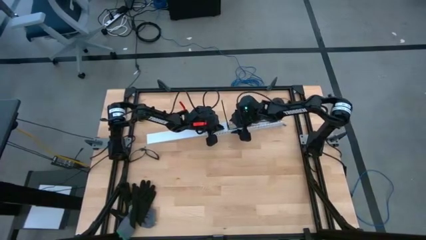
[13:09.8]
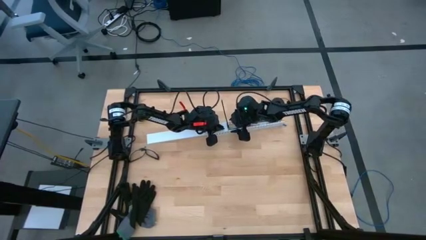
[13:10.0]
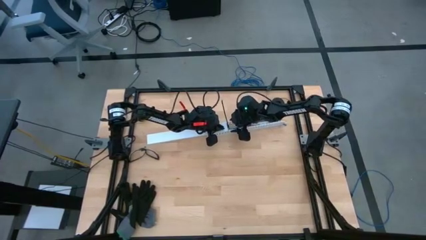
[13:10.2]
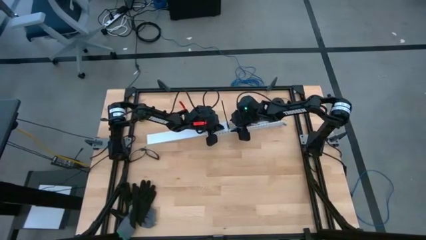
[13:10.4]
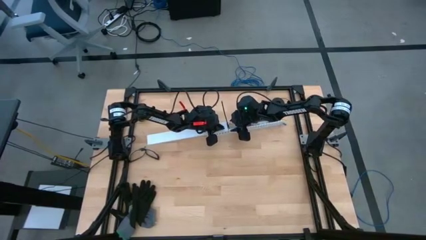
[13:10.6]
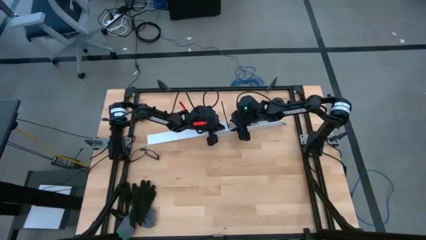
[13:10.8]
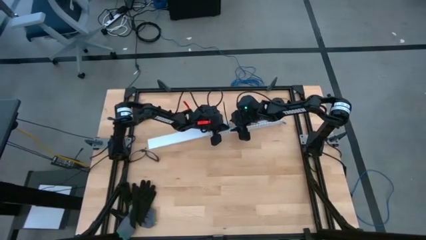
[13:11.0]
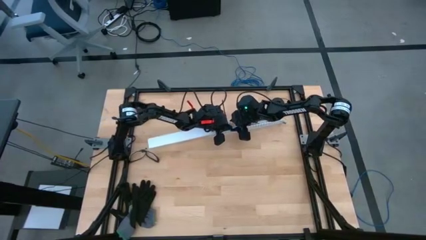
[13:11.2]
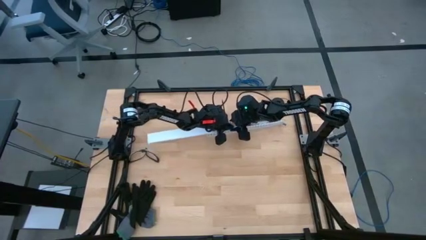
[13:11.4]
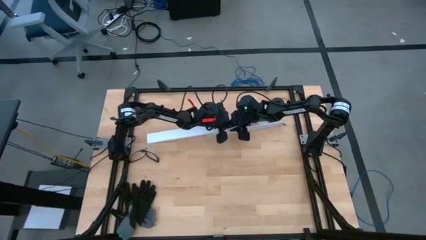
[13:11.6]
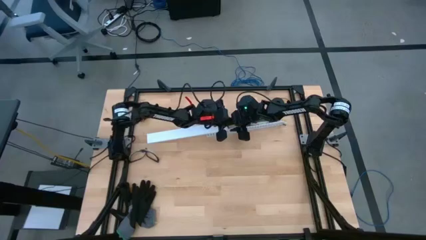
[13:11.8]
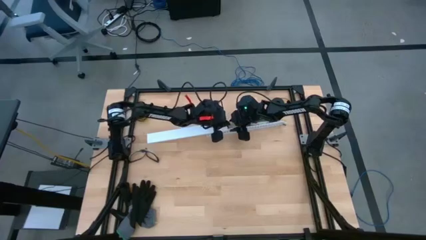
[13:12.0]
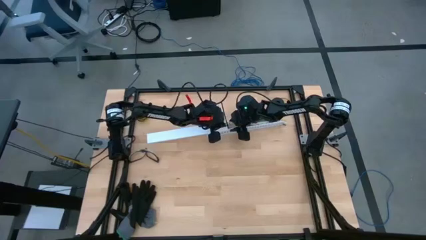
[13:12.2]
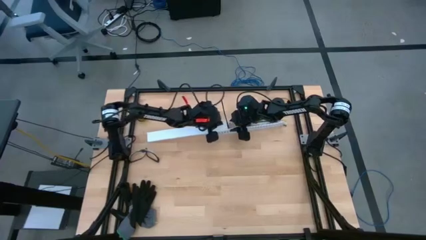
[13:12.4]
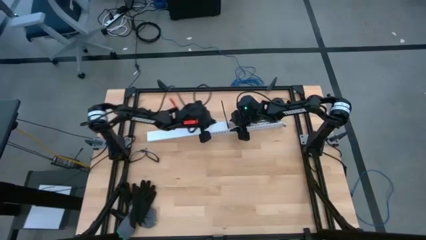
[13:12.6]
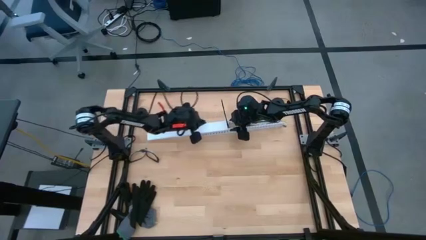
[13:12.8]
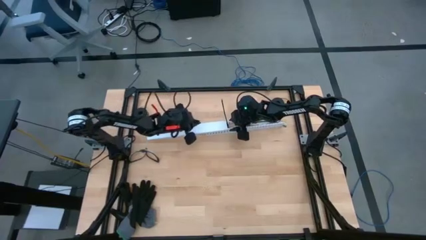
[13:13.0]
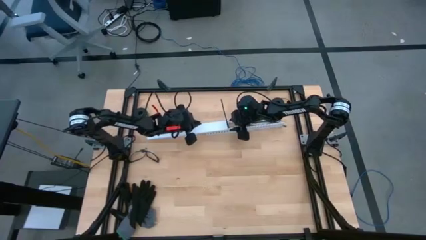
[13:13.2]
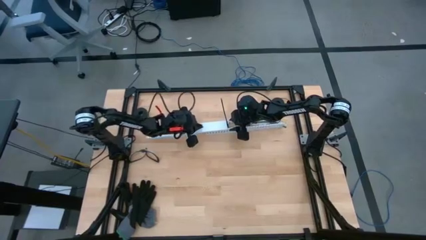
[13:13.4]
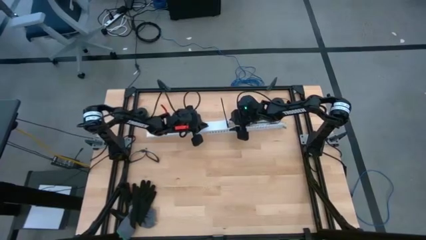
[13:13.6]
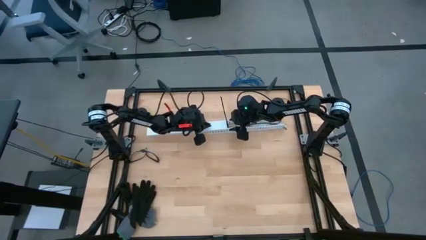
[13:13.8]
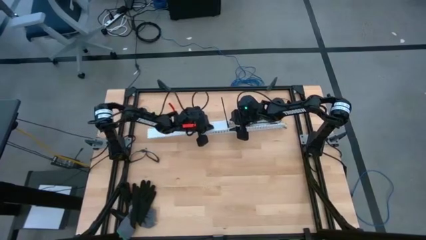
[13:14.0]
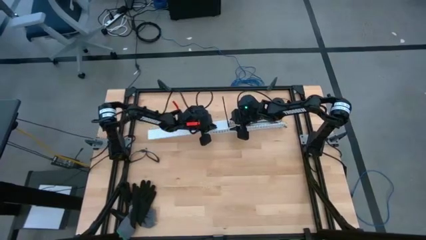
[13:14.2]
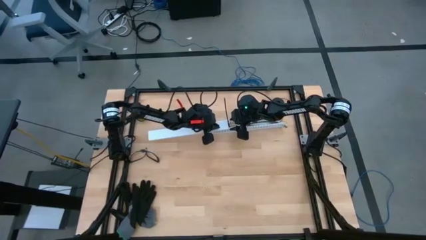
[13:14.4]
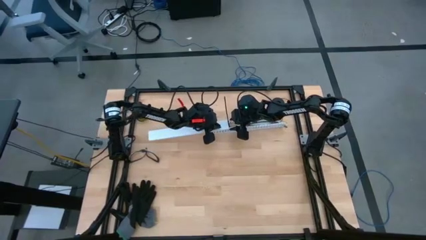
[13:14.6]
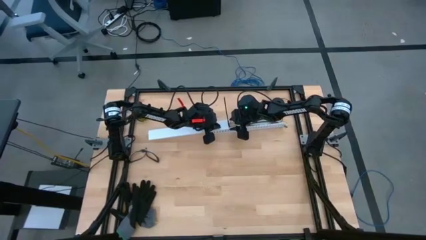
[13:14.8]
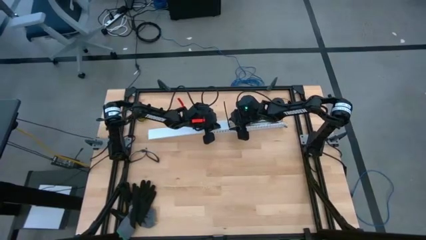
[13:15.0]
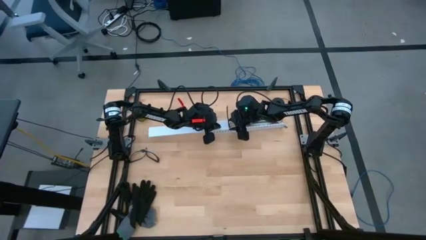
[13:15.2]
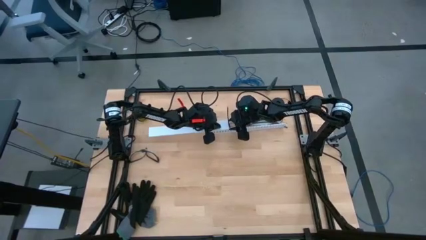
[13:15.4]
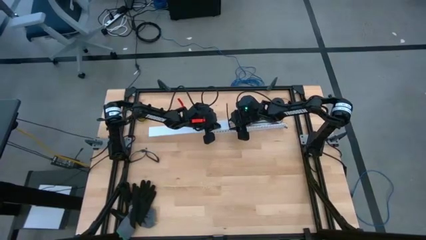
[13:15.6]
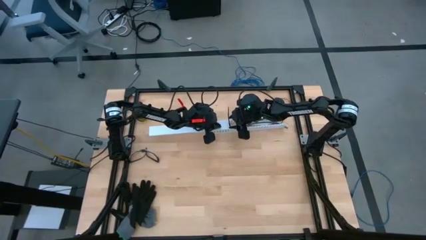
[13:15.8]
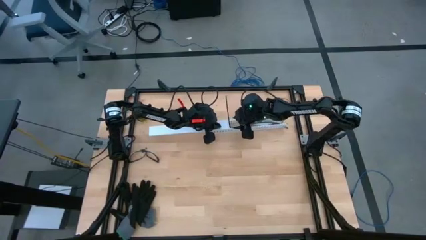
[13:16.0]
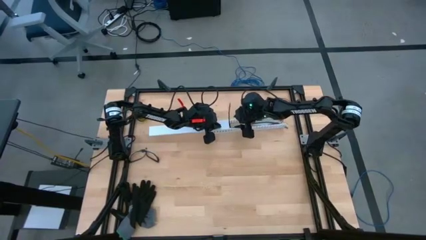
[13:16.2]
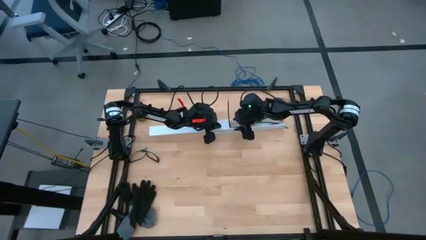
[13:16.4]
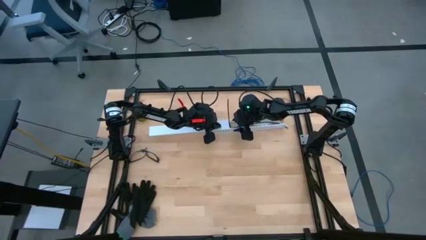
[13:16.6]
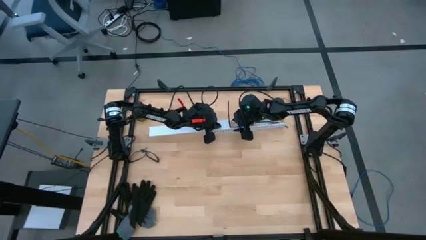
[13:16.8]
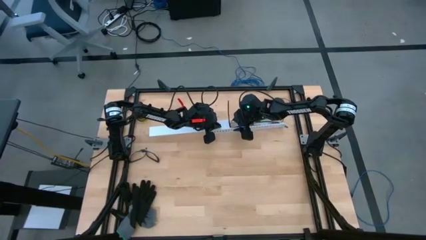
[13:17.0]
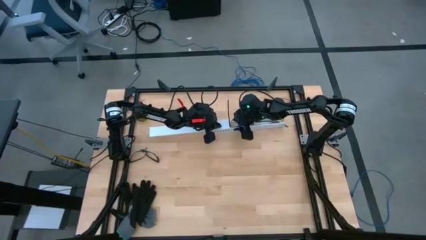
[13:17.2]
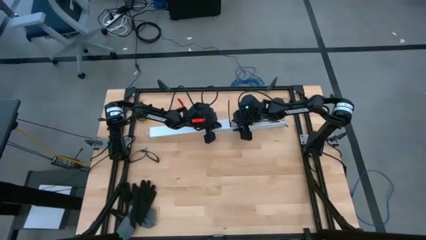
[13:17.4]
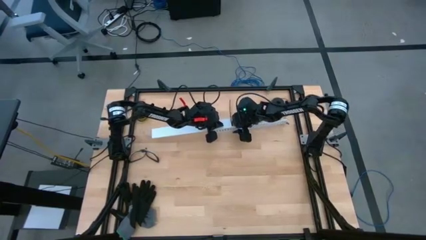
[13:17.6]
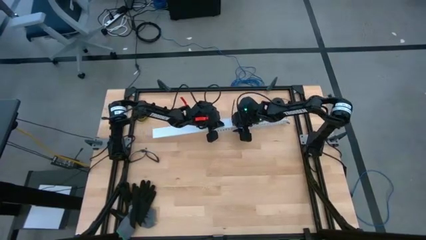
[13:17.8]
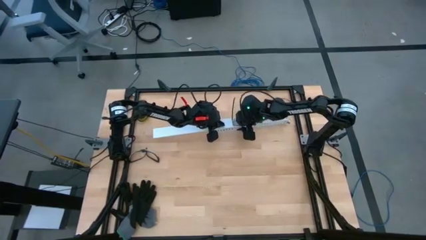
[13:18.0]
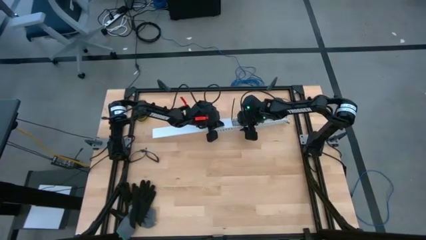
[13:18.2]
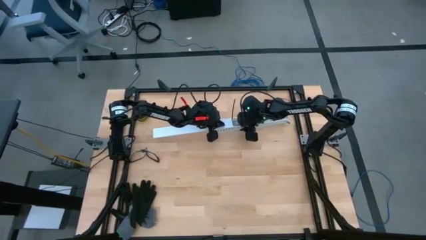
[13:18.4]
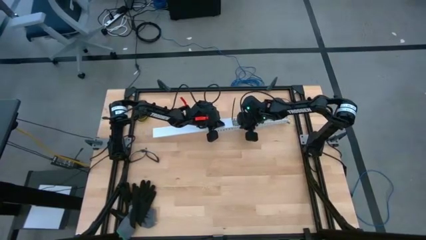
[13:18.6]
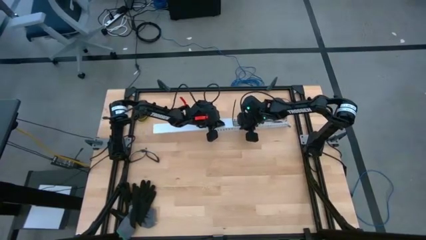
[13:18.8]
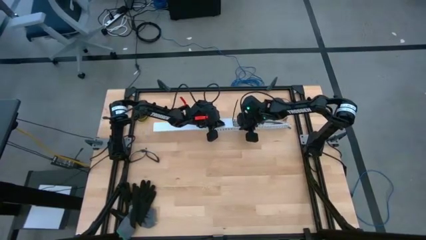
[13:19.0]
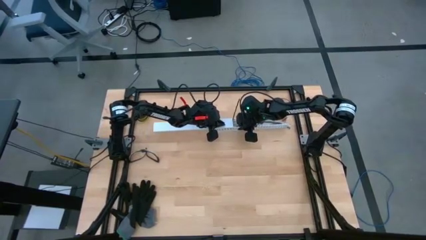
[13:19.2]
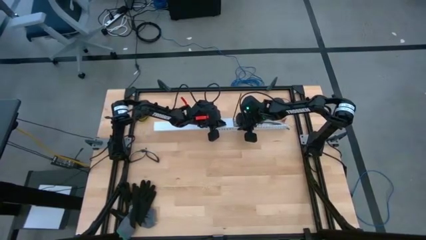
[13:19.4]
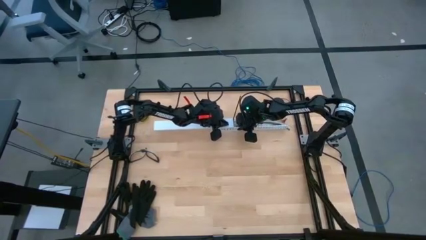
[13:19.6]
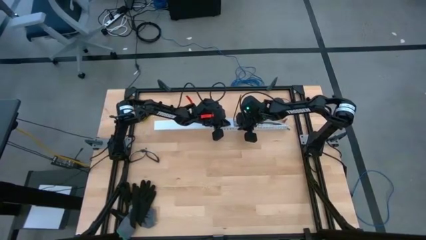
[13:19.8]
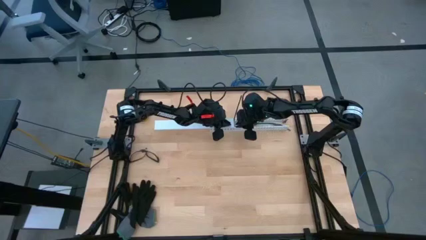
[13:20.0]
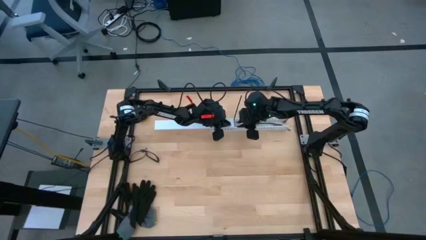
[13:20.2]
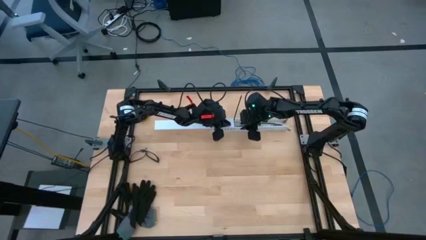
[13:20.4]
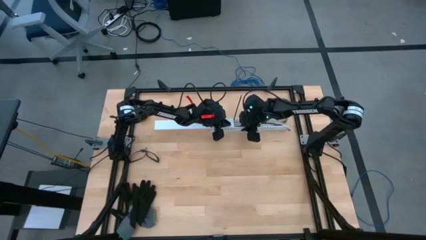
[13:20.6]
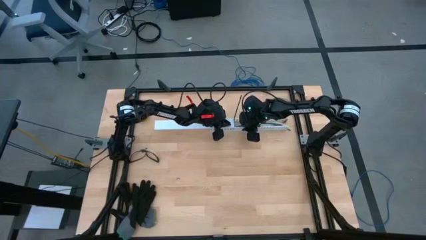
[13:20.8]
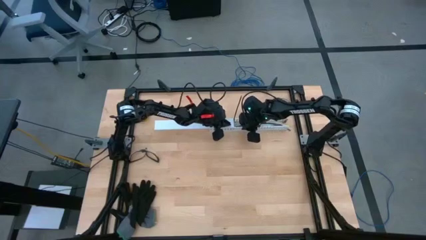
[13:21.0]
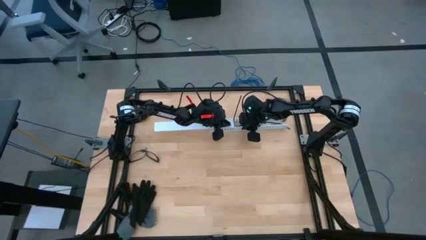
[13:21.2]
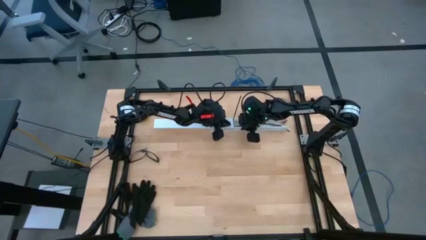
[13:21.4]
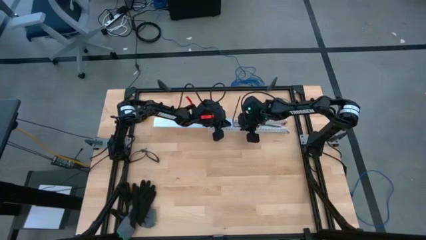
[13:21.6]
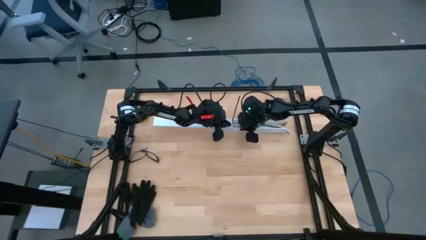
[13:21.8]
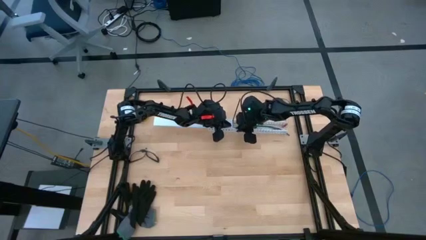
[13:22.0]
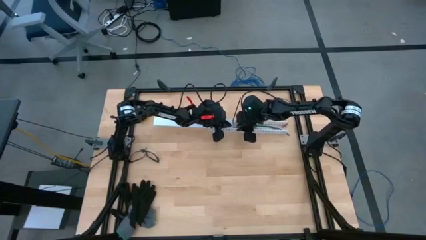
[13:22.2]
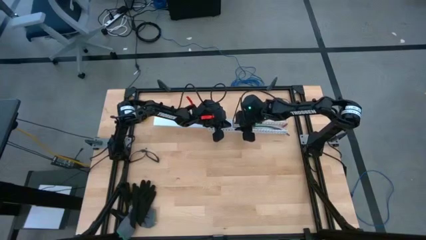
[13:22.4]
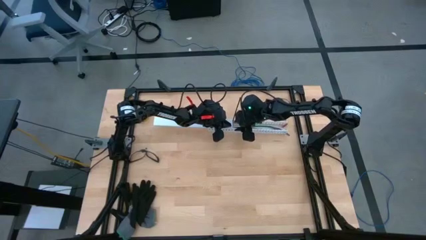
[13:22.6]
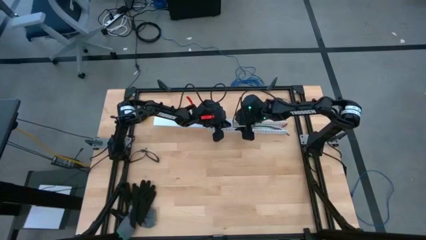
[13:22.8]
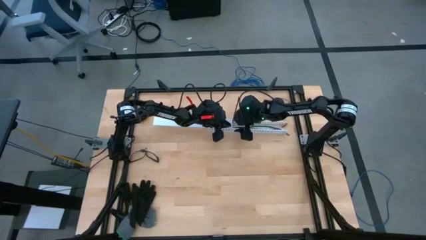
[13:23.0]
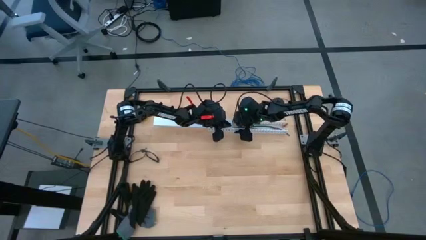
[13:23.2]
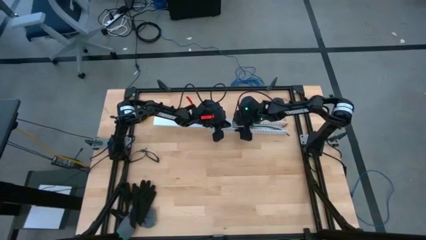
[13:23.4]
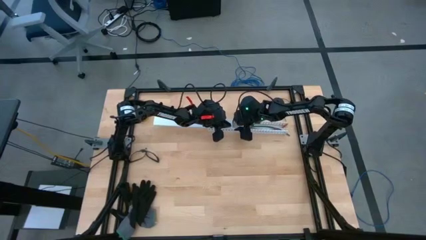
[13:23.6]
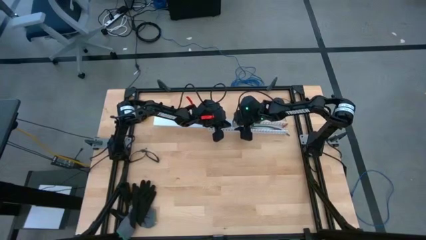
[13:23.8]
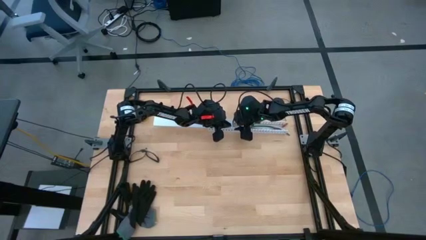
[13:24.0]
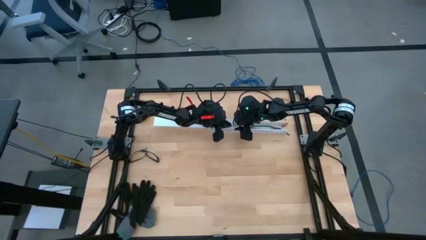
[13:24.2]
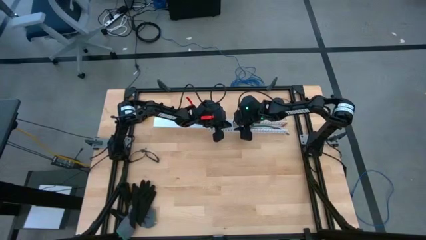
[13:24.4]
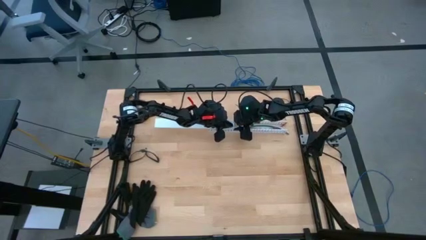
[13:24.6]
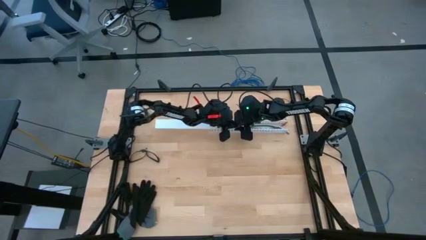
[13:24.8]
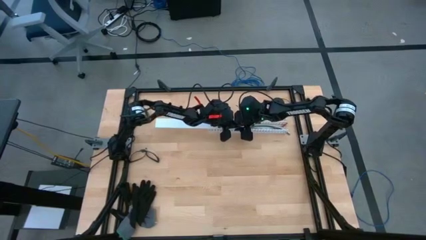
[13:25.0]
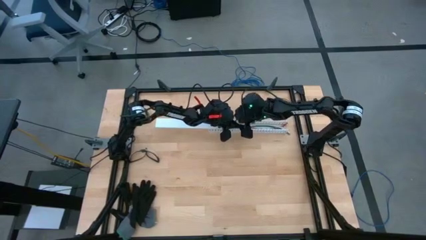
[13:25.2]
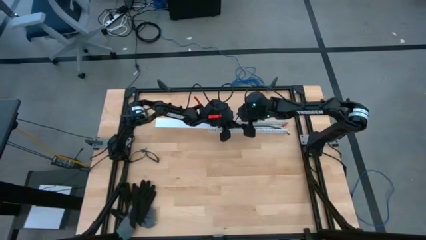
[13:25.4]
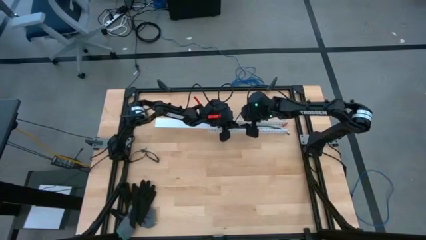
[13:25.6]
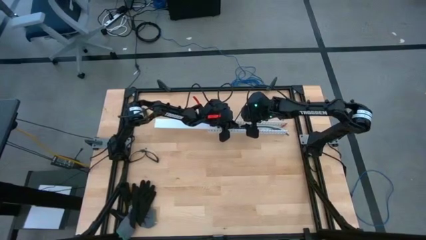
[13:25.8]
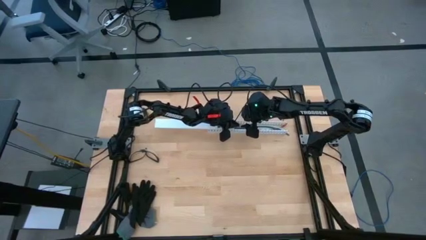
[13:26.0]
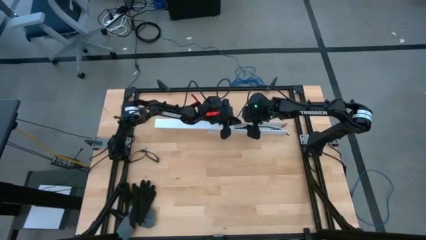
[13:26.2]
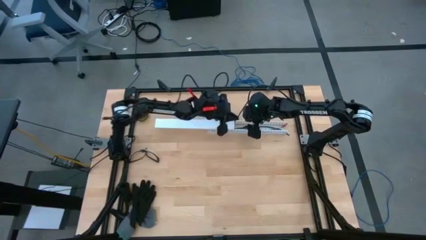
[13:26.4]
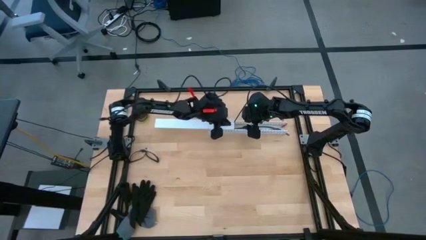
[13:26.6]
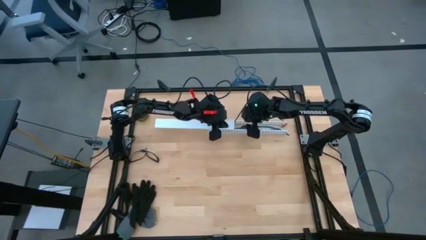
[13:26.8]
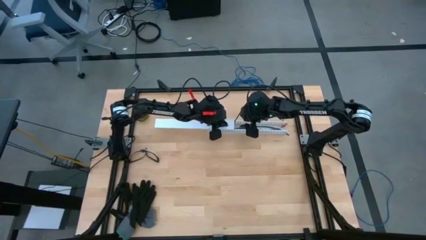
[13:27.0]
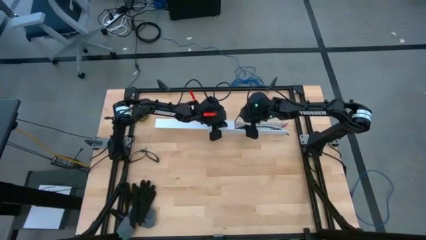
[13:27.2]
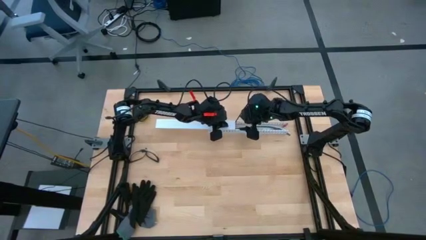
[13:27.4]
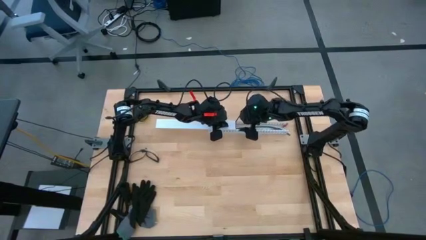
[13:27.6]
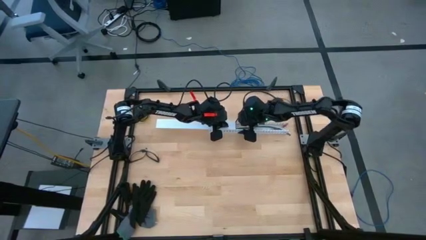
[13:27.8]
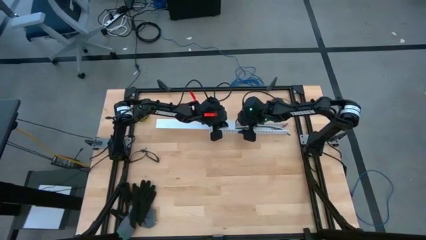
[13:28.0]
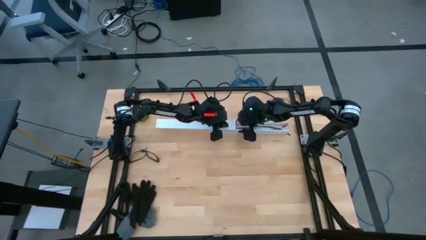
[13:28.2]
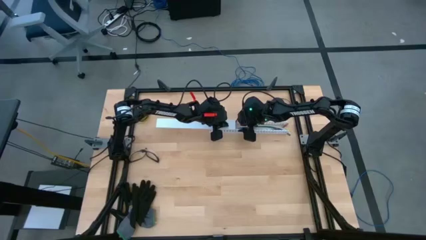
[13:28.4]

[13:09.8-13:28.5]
Task: Ziptie cables
Close the white cable duct
